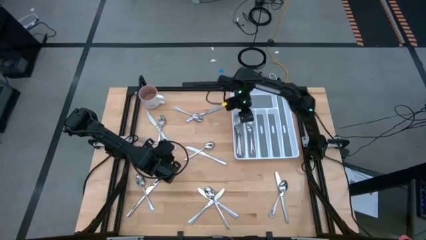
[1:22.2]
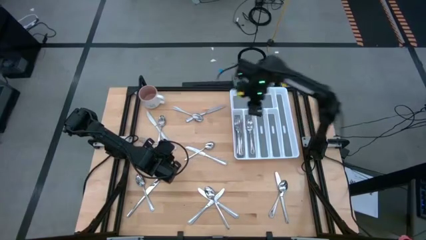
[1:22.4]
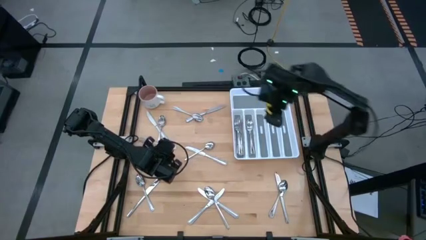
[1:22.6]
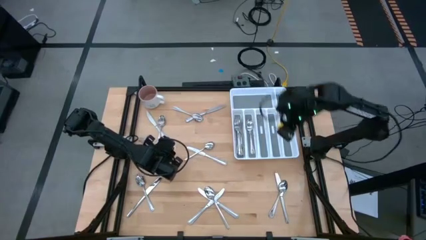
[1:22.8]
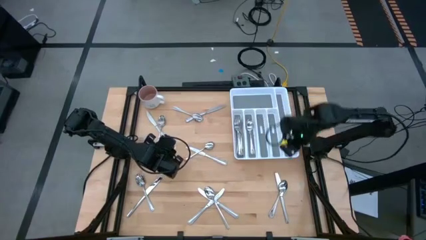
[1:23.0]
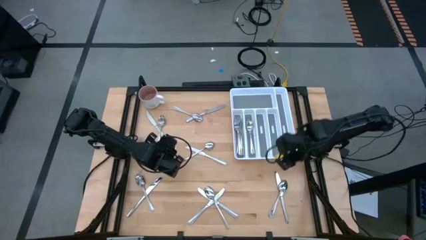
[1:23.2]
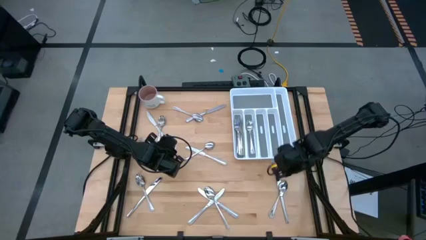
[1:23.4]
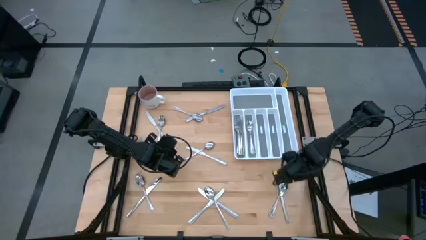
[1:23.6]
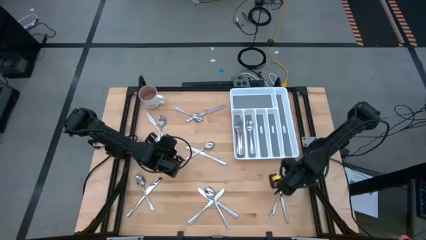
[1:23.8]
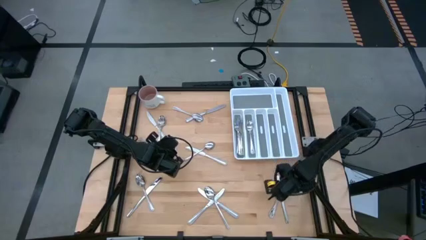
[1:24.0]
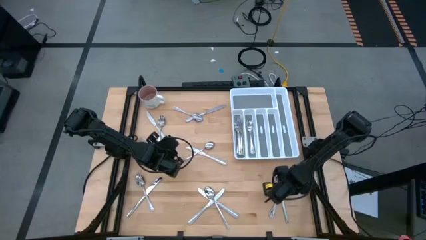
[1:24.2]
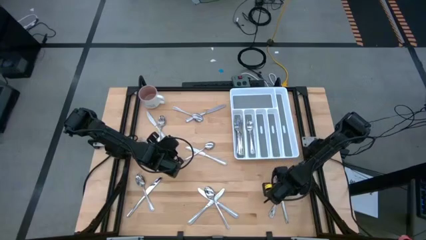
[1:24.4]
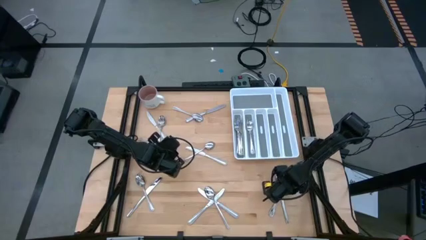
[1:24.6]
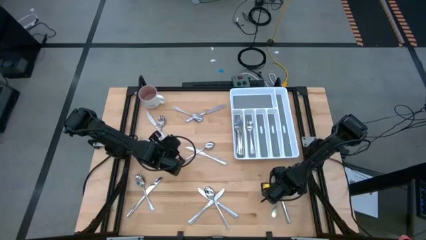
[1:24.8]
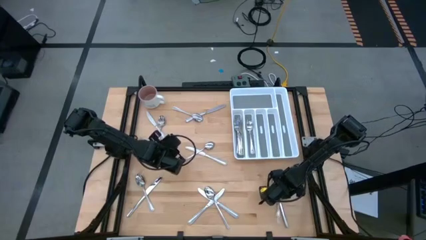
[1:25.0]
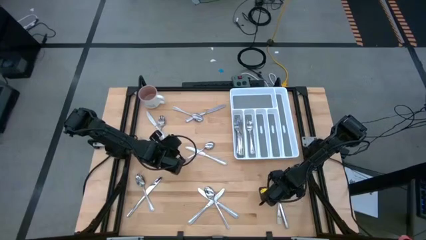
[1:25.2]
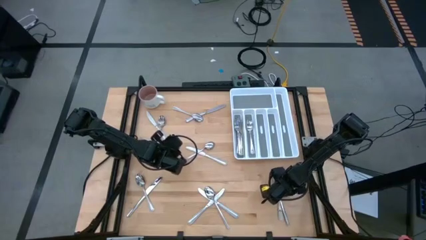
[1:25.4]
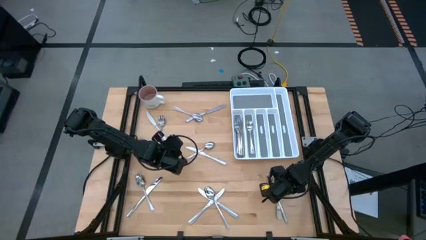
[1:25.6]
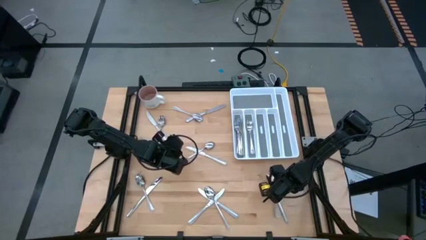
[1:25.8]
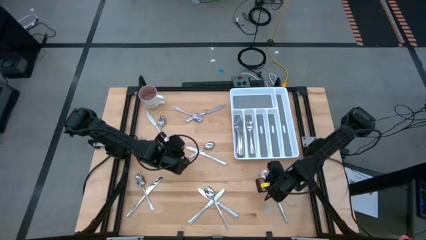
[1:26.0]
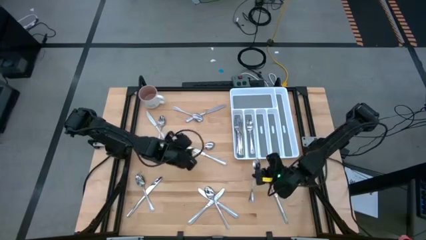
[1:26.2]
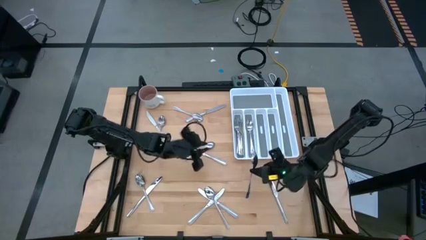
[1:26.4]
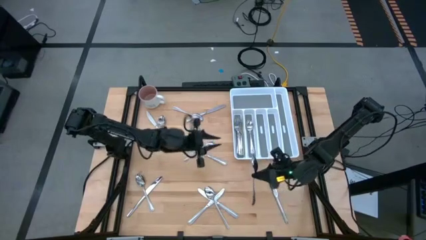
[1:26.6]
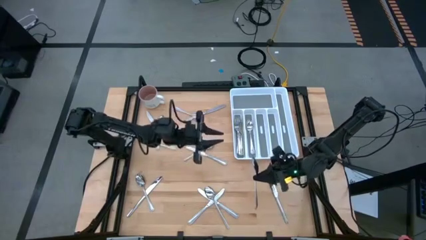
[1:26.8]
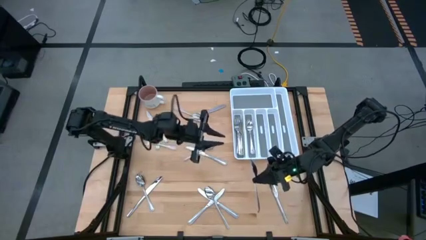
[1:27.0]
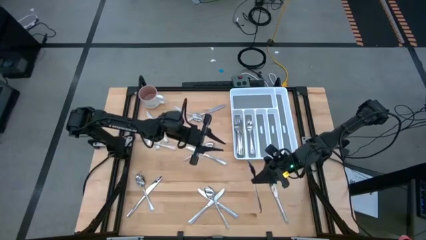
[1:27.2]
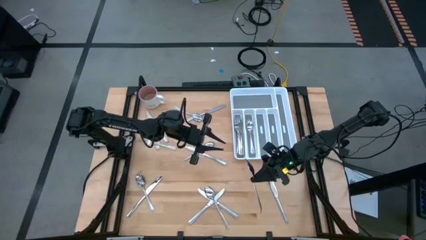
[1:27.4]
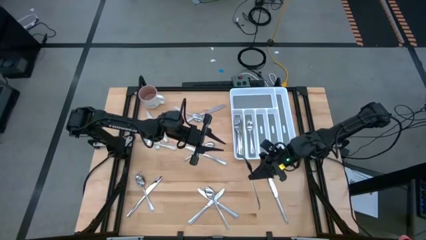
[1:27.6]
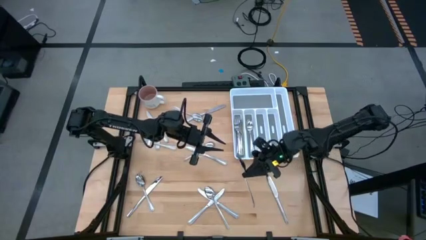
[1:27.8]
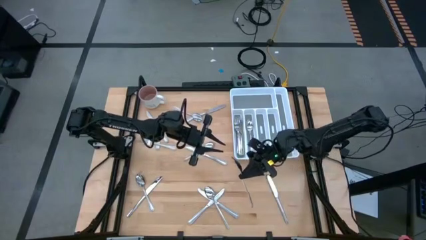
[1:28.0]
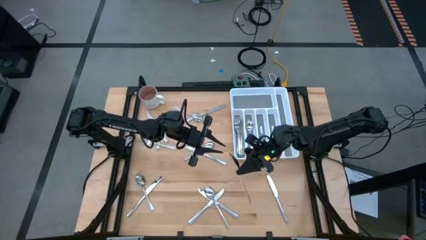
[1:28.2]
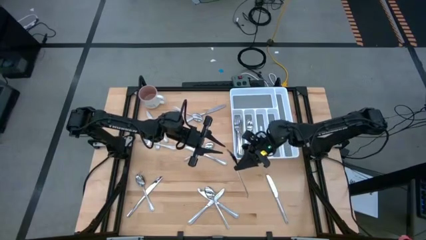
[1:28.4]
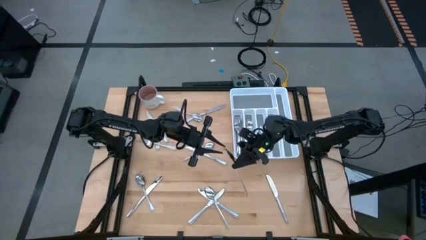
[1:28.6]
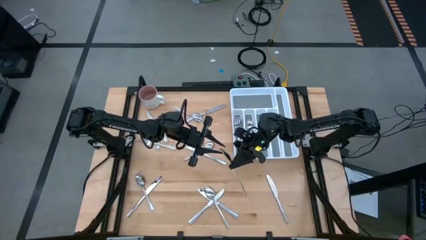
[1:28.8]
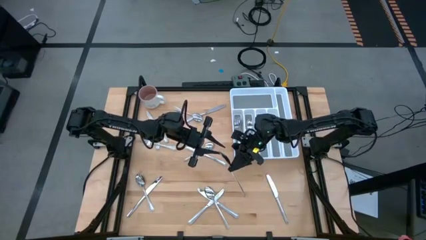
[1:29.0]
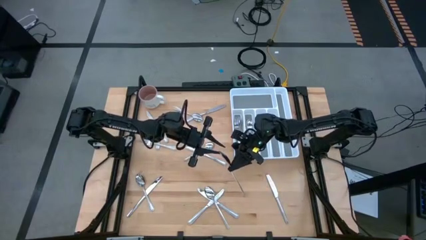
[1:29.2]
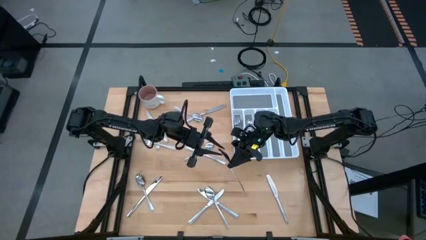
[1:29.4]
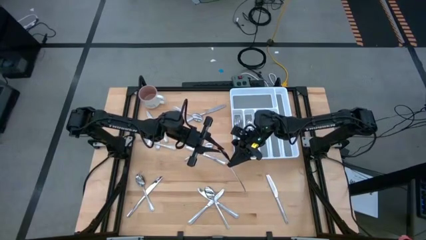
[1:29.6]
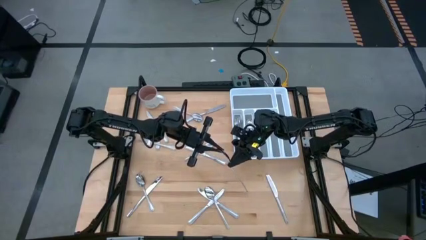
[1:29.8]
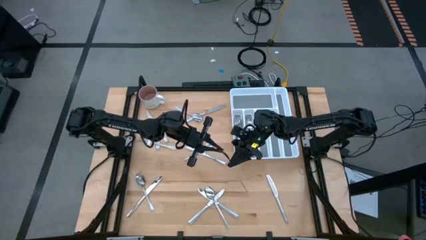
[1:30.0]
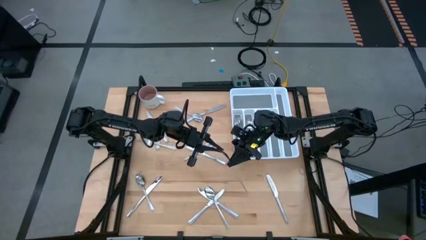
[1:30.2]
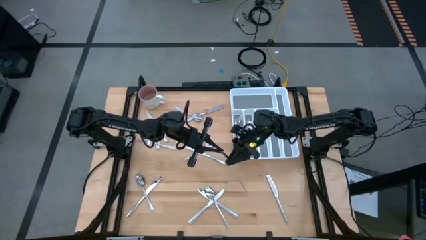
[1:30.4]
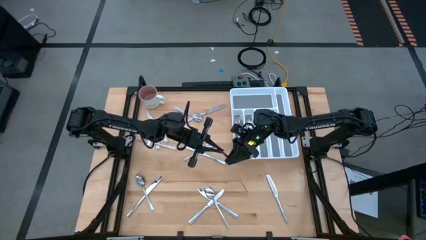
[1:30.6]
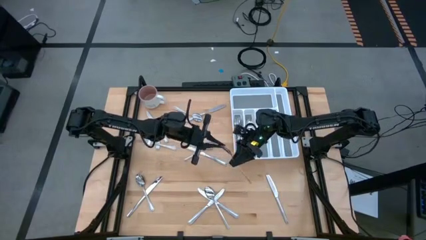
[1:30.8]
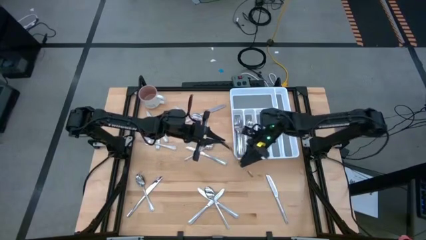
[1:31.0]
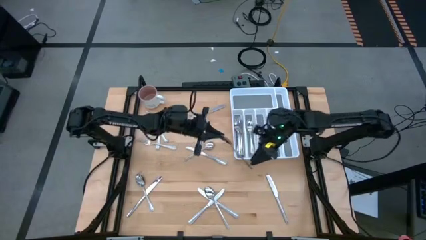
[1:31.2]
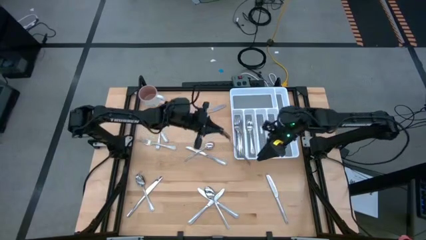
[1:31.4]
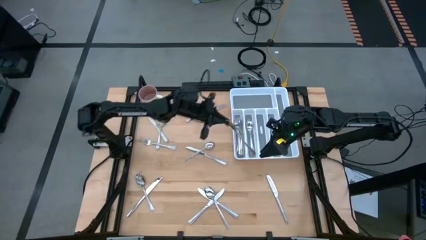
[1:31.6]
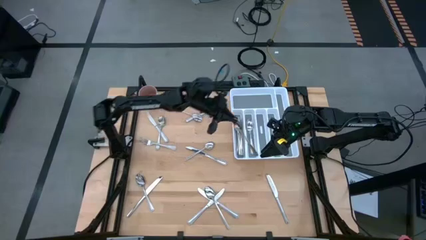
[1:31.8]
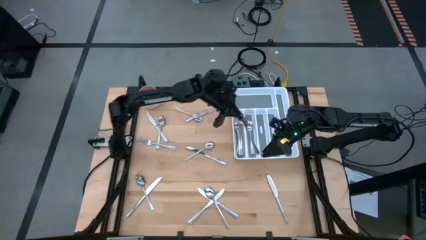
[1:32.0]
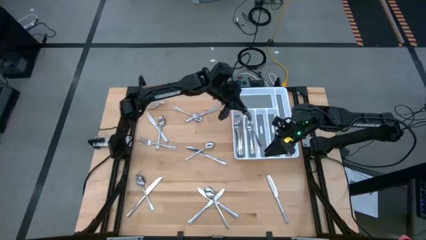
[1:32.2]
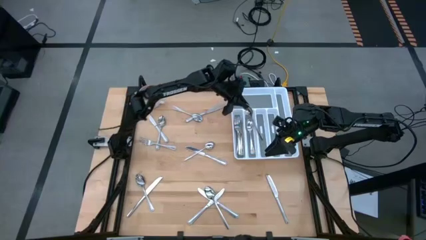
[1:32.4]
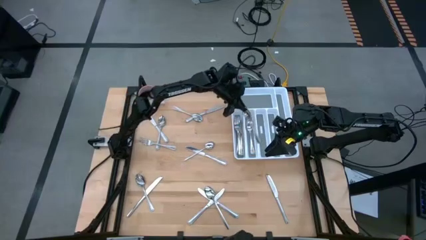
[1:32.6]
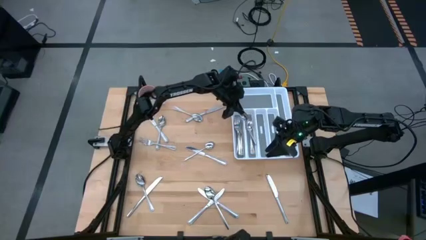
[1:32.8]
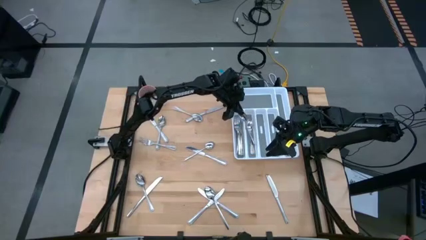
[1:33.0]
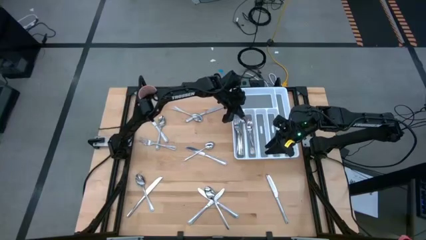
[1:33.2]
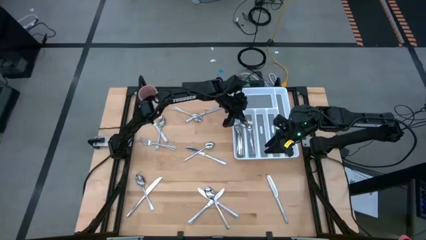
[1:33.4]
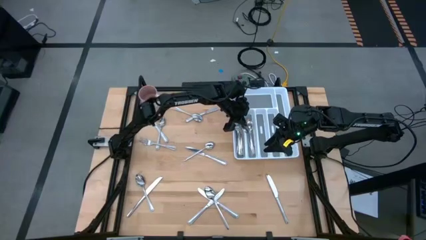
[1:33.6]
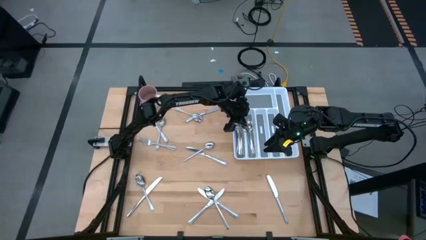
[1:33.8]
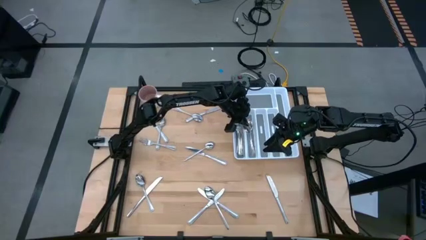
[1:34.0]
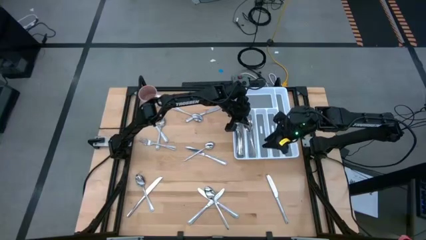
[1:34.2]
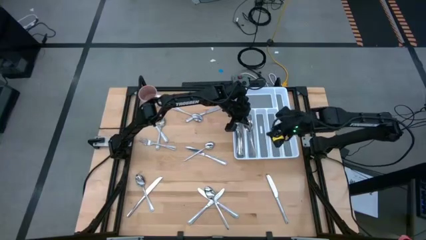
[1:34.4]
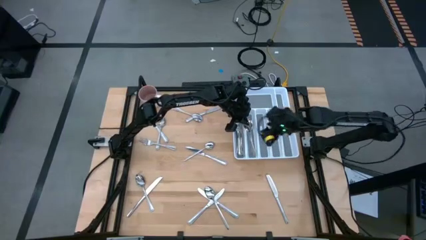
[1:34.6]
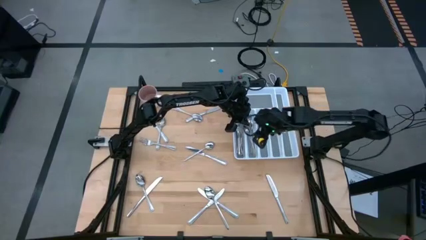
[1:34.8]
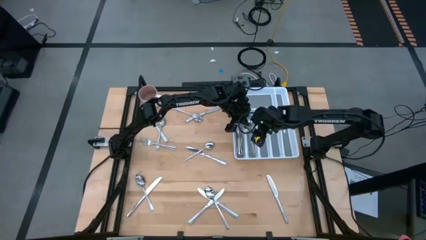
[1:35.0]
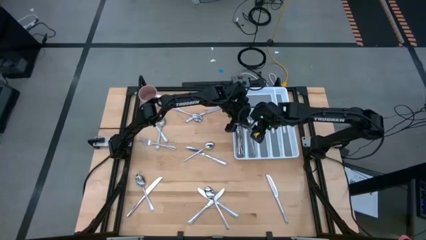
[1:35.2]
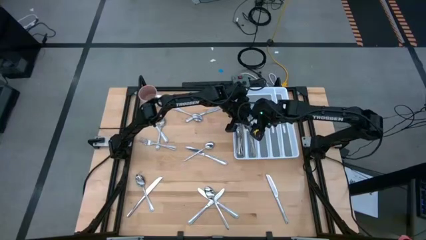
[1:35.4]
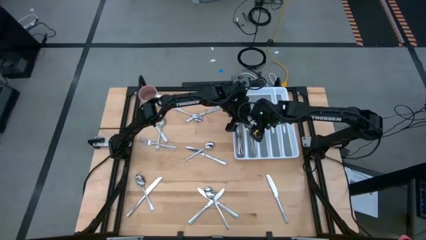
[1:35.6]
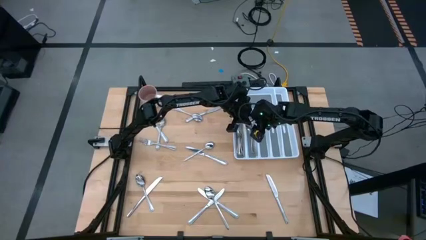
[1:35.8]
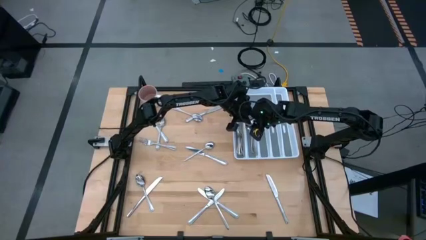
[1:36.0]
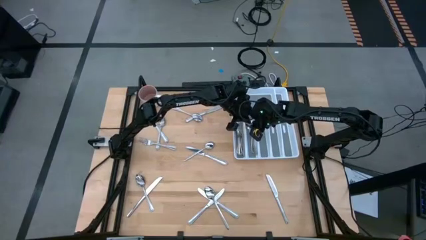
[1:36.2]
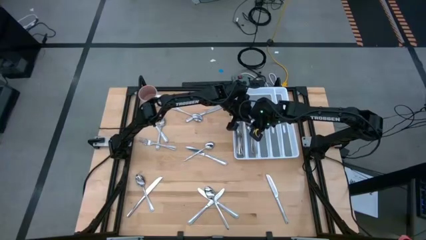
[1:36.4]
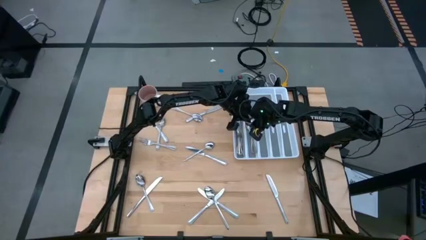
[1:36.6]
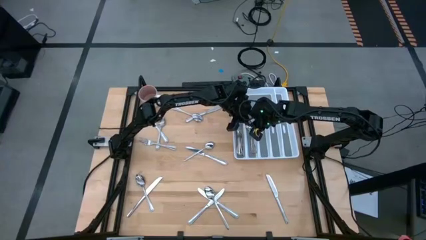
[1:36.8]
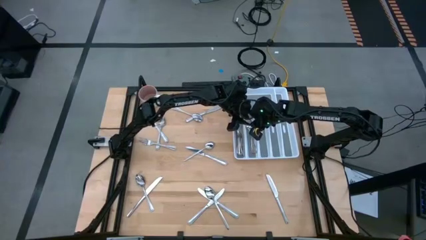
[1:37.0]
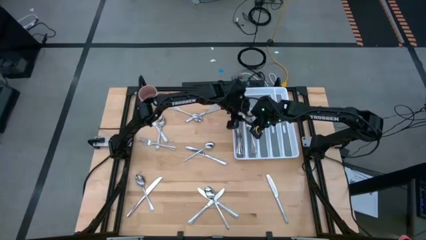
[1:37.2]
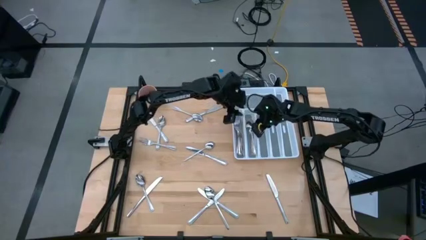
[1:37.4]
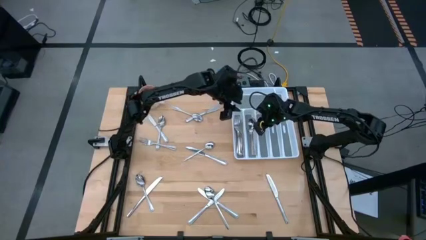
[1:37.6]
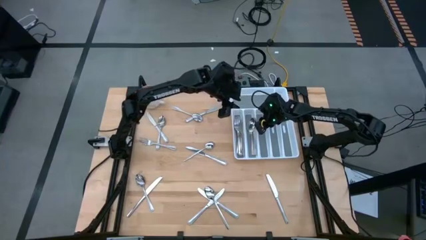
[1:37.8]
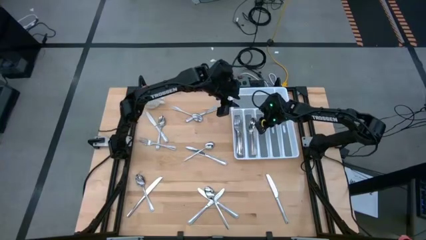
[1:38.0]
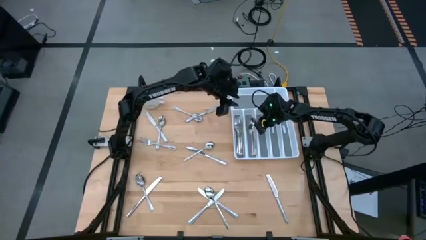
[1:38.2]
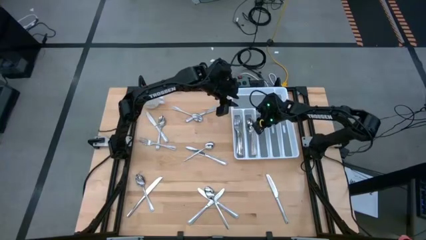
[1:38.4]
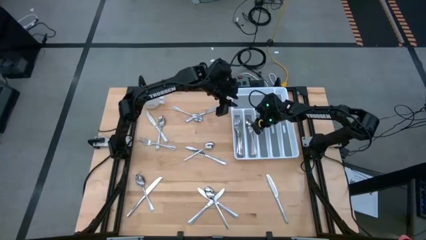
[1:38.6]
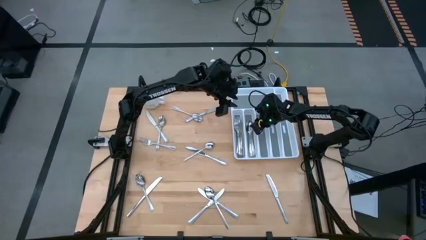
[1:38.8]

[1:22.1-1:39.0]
Task: Sort silverware
Put the silver spoon into the silverware tray
